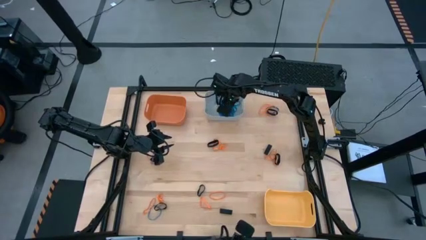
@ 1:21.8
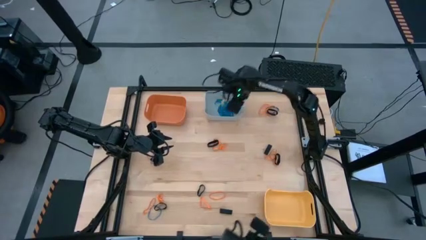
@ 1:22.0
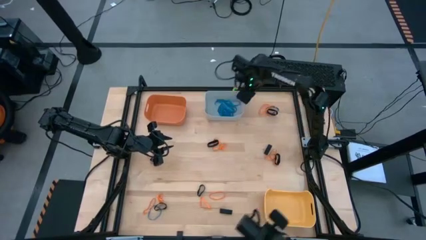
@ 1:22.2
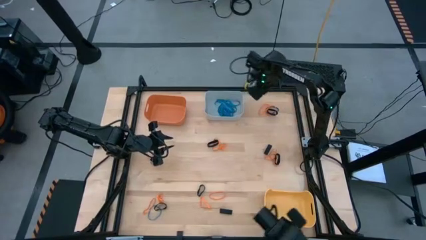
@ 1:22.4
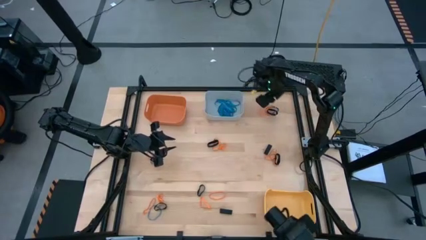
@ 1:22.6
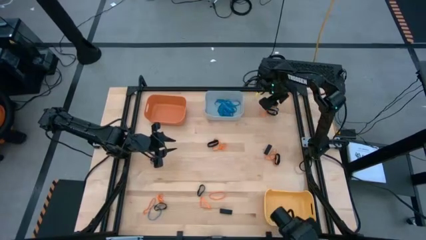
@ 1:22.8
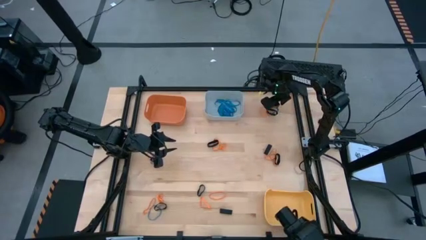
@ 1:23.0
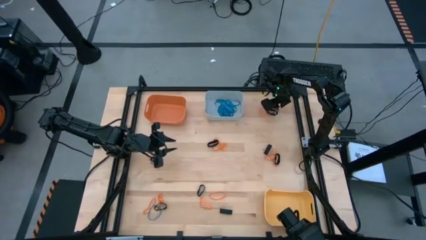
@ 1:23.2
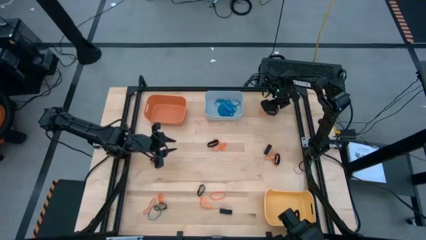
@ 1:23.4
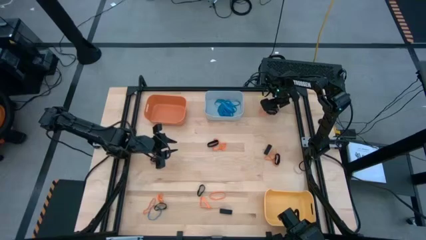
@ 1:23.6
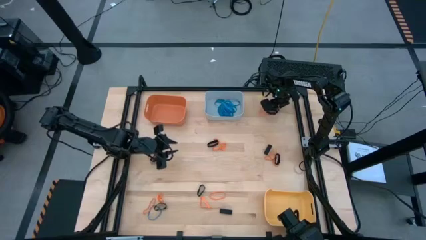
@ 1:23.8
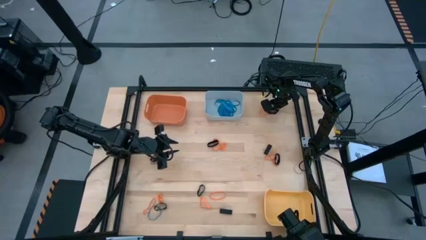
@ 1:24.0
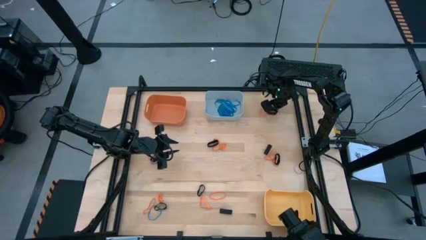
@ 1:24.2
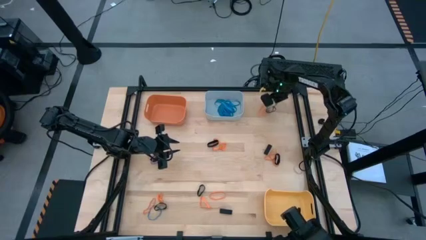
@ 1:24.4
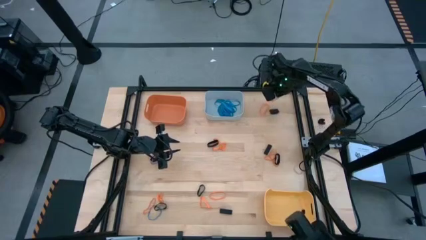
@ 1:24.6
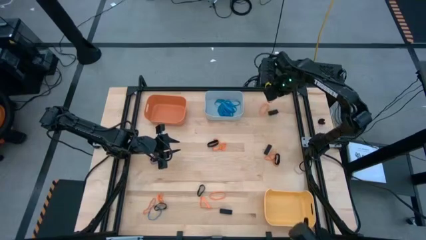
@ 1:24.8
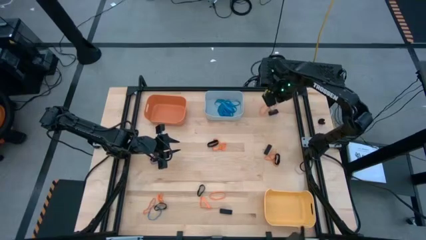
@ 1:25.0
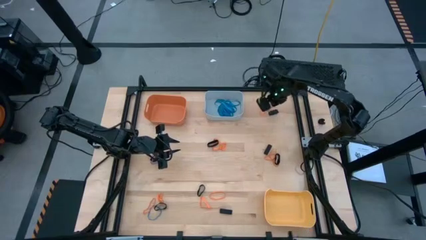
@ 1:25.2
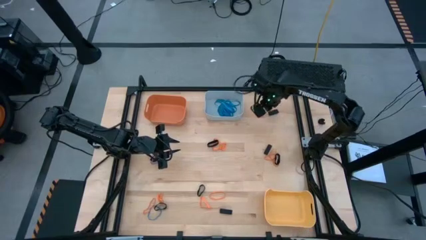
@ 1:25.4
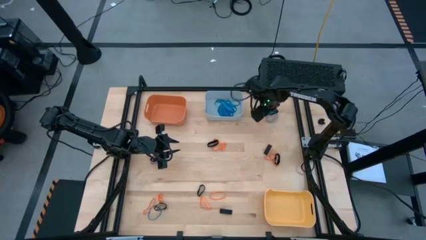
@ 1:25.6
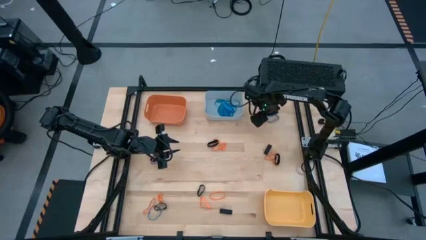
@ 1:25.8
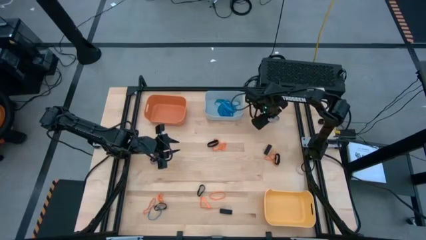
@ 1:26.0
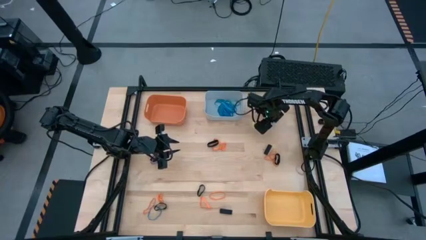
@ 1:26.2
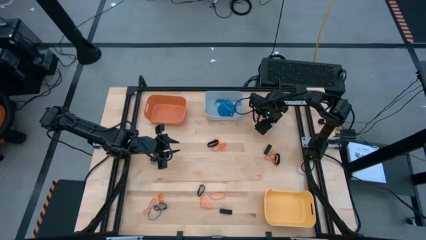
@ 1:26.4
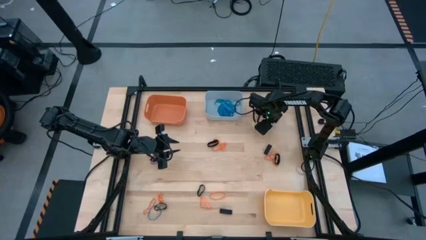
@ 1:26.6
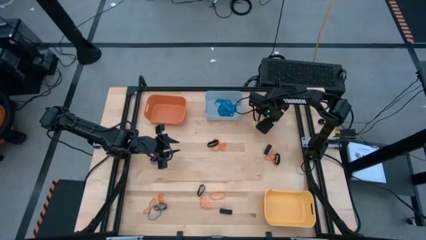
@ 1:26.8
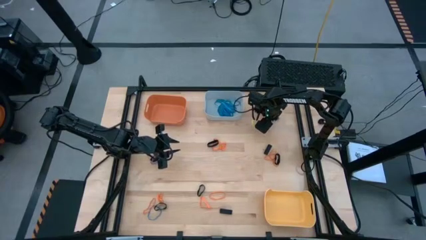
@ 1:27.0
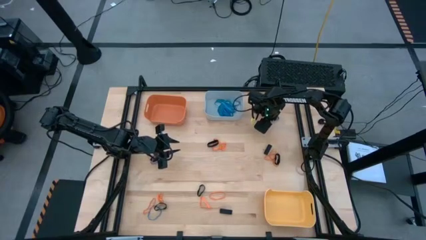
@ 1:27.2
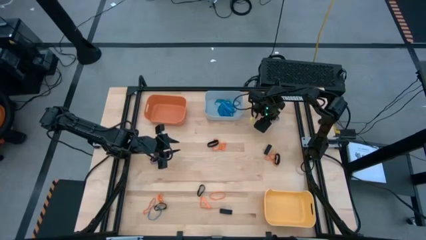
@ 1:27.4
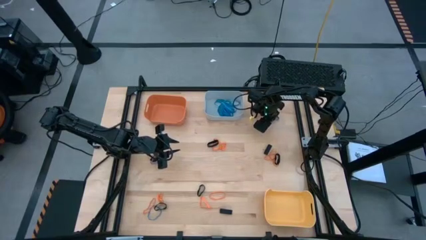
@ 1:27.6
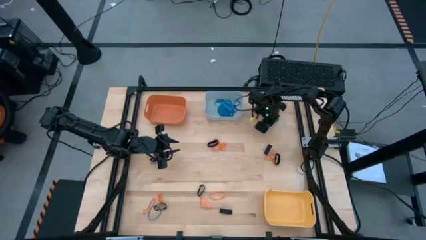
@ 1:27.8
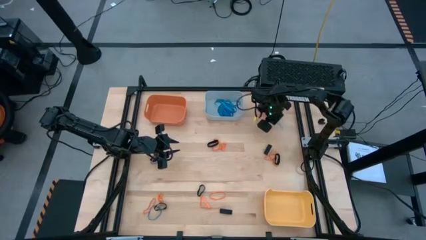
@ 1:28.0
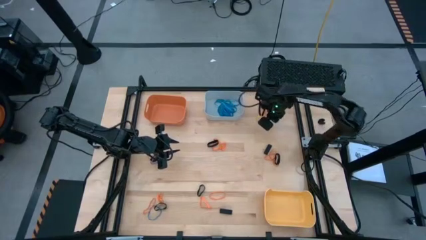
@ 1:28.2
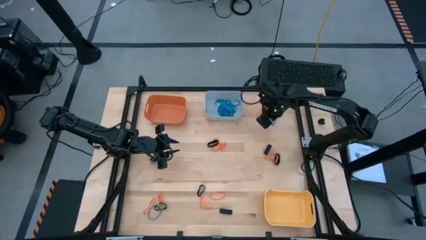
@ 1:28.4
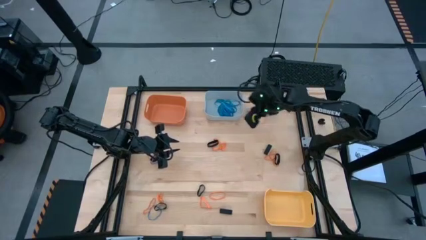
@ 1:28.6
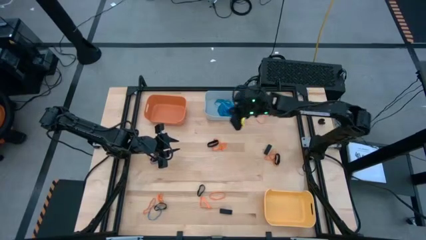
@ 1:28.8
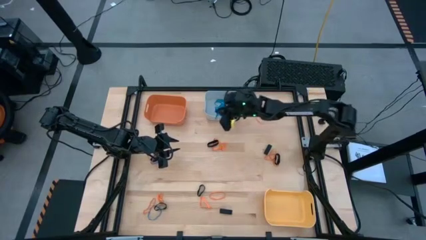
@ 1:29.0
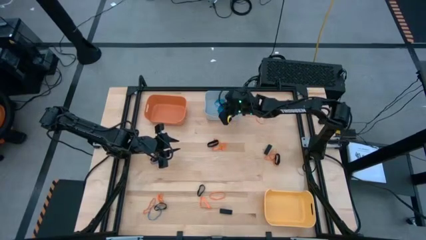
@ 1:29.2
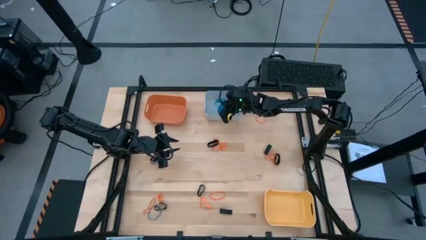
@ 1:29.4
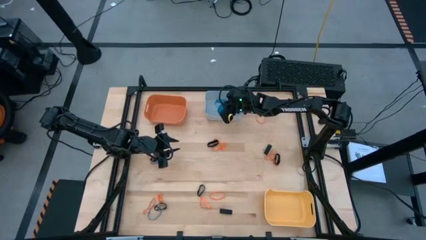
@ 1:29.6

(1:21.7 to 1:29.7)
Task: Sort rubber bands into baskets
Put the blue rubberband into the gray bin

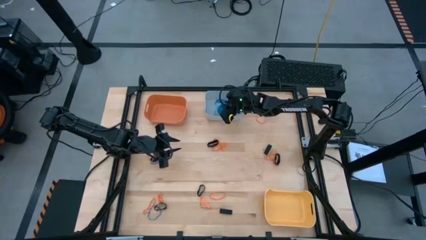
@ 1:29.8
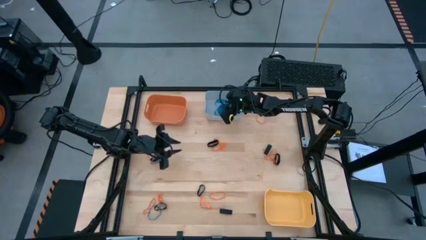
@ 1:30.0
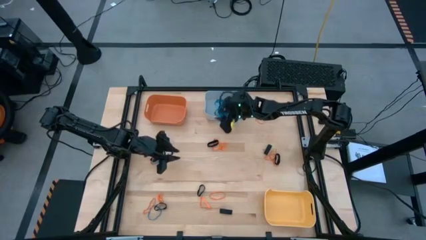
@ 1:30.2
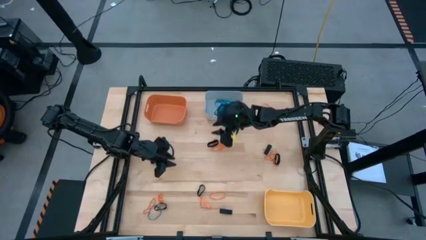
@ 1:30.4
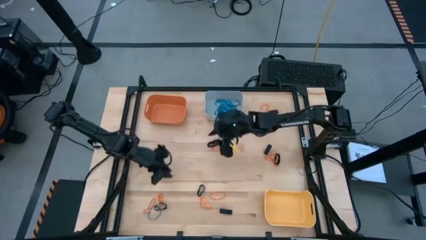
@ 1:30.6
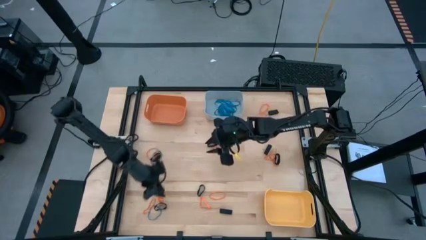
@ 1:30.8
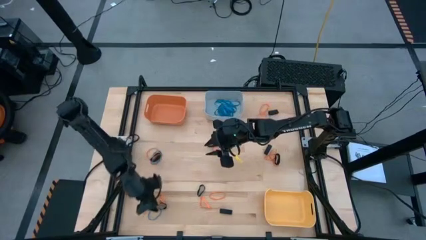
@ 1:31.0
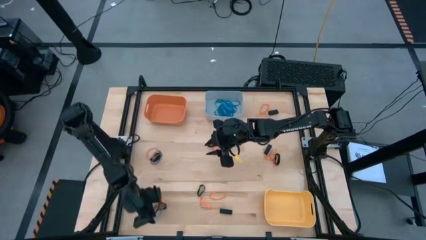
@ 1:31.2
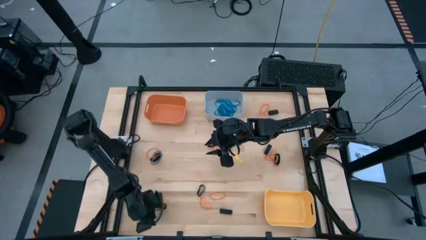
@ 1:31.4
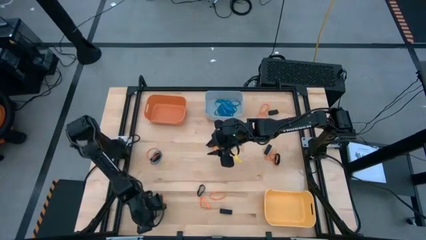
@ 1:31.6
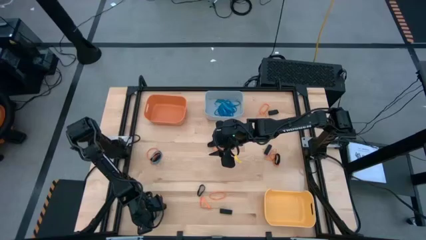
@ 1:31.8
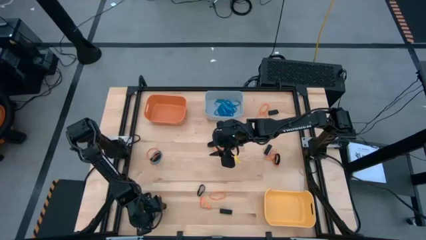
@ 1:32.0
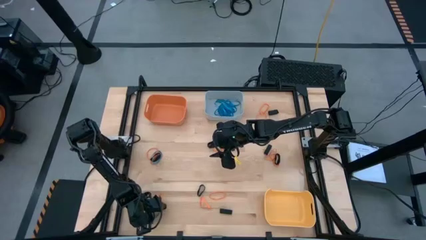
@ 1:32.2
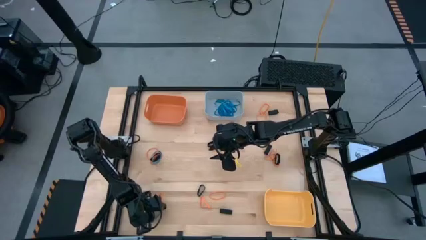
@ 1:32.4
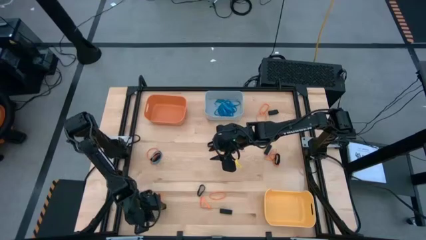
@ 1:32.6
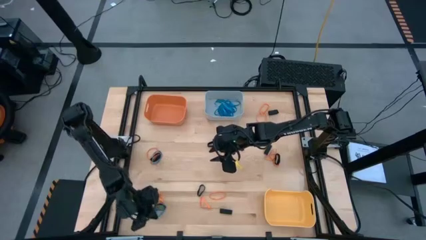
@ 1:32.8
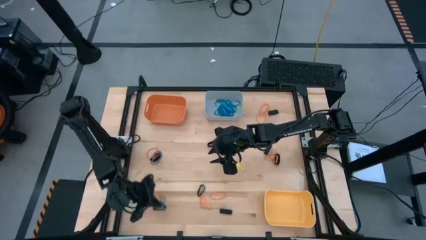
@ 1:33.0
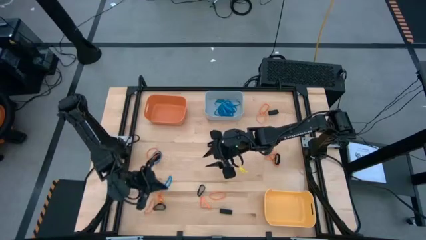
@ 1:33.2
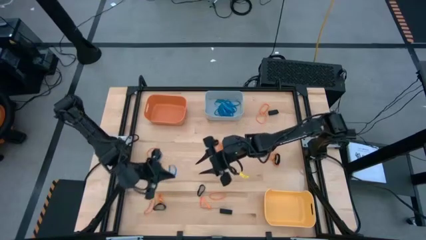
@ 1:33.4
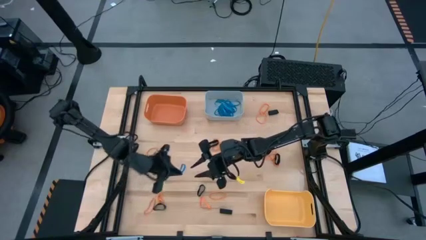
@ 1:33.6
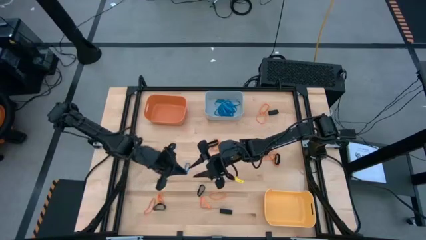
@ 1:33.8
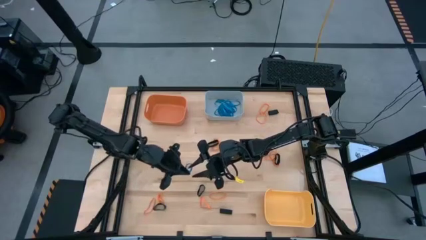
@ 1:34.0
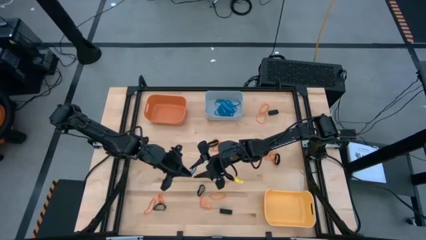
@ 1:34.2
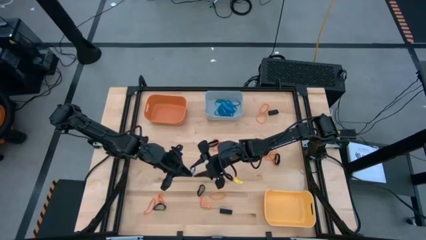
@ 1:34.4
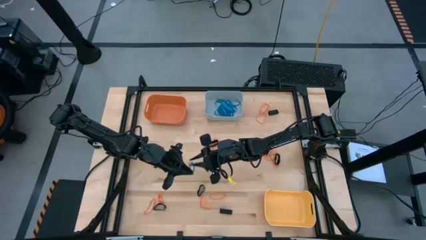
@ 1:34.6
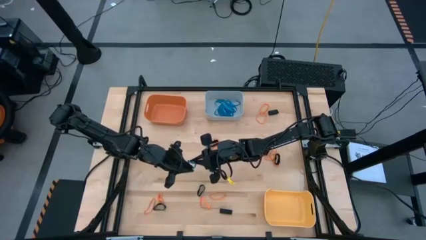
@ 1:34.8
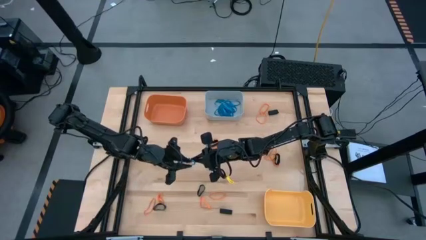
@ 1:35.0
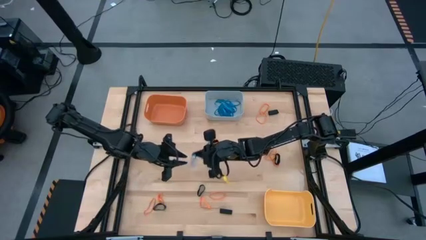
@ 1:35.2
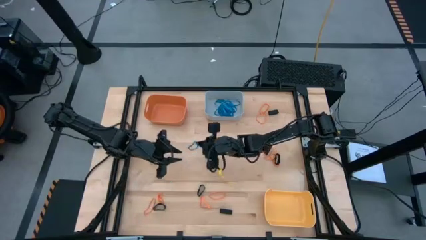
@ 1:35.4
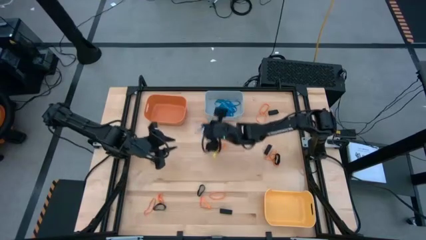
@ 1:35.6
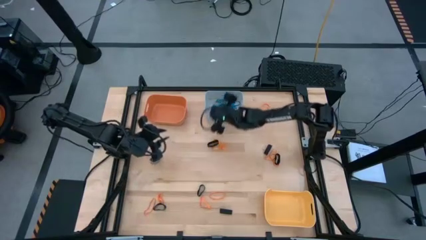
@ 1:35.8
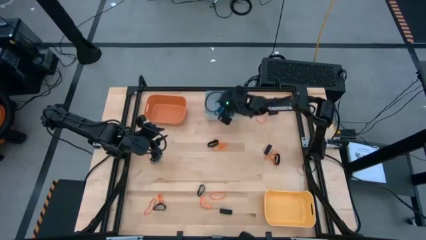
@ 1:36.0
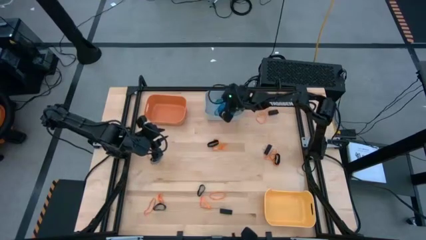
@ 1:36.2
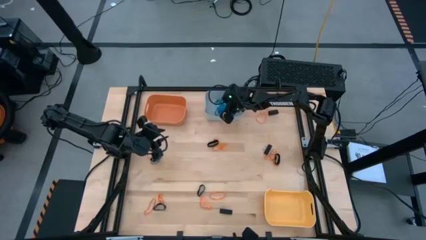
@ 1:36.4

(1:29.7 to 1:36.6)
Put the blue rubberband into the gray bin

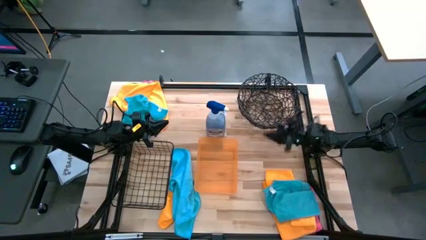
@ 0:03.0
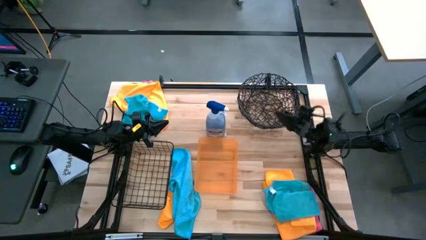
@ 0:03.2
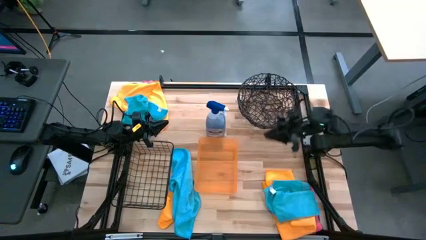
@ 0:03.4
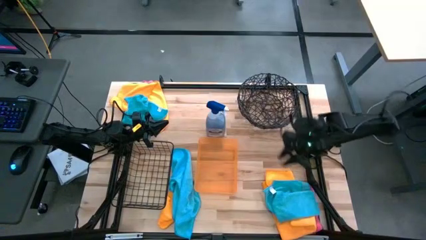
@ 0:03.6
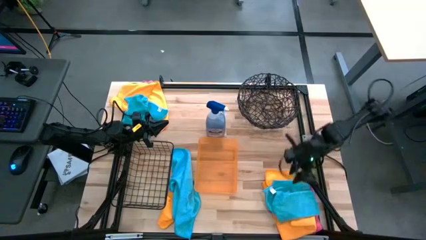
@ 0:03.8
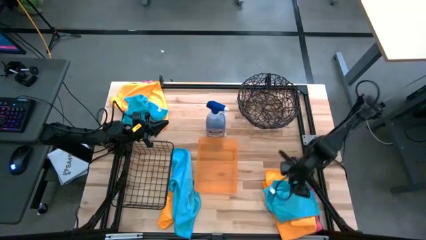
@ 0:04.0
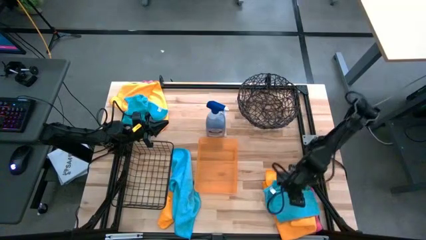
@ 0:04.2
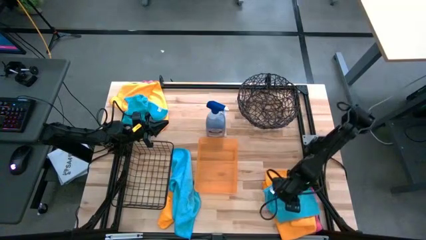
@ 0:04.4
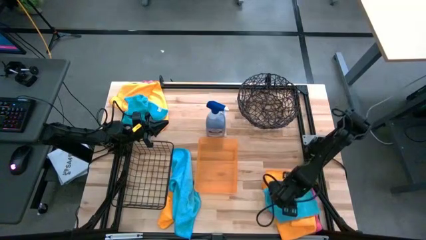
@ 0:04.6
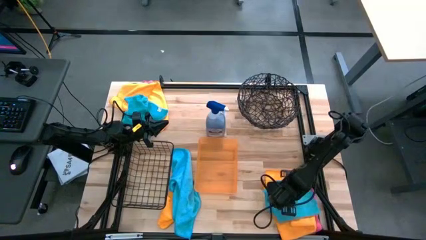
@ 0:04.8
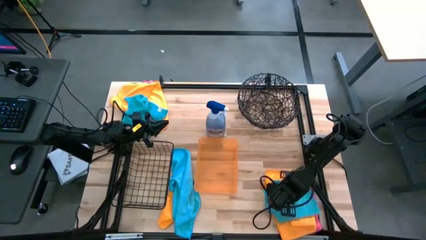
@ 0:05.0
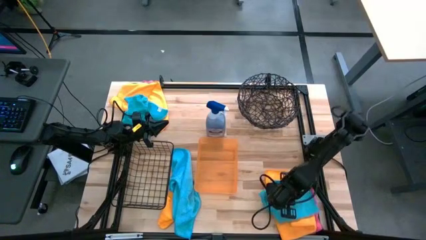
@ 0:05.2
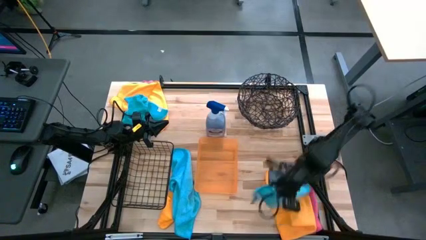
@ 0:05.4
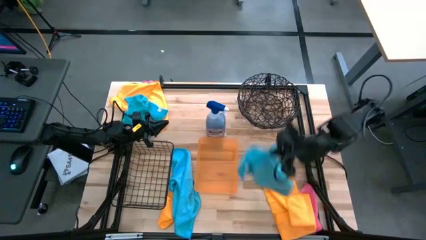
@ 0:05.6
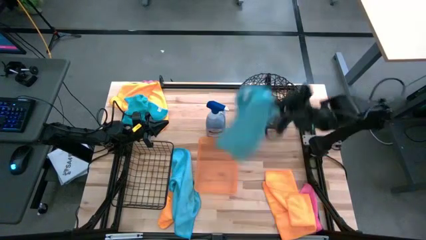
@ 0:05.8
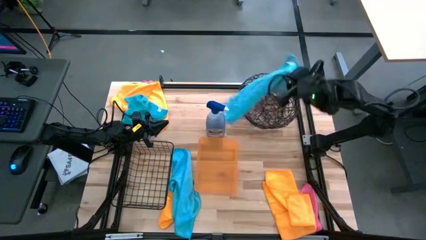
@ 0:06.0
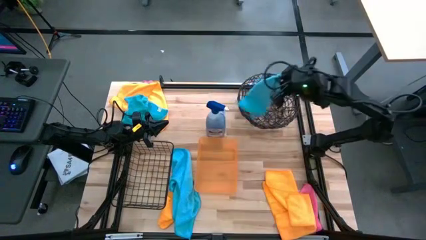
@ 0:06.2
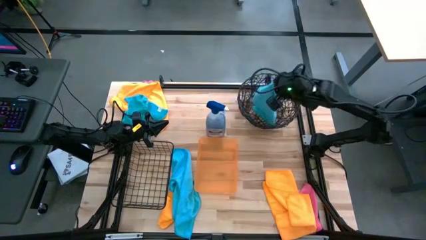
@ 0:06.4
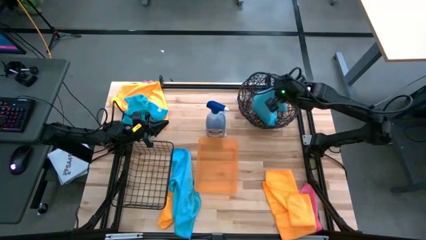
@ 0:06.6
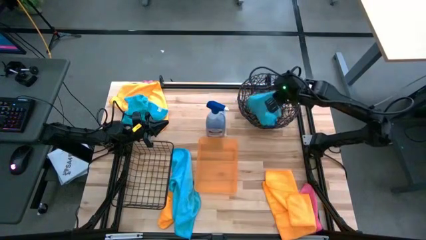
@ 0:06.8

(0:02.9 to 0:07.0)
Task: Sort microfiber towel by color & place in baskets
Put the bottom right blue towel into the brown woven basket
